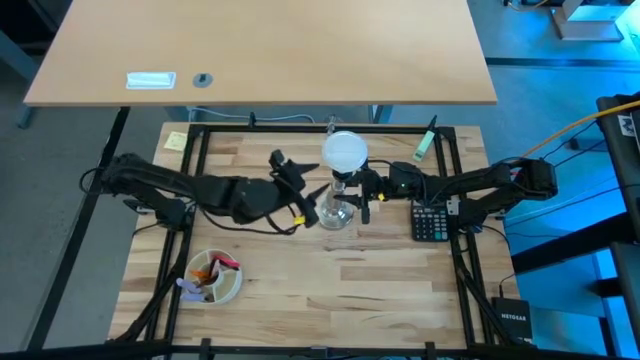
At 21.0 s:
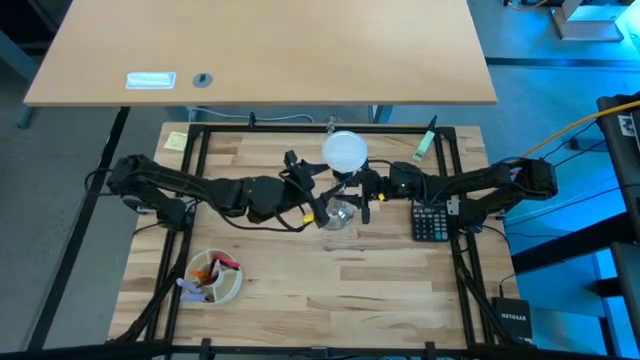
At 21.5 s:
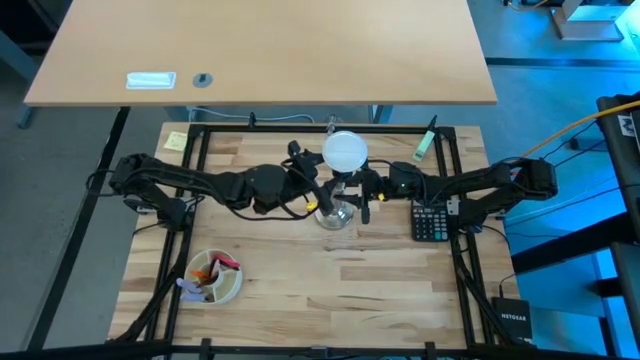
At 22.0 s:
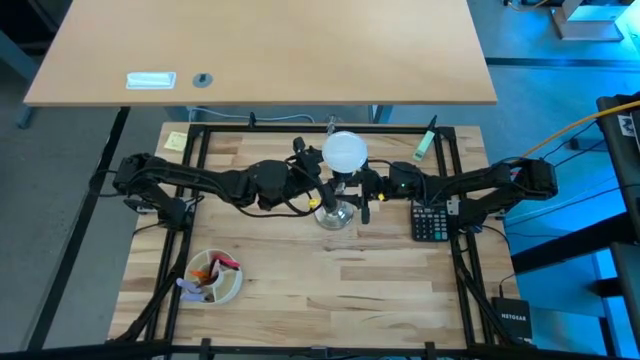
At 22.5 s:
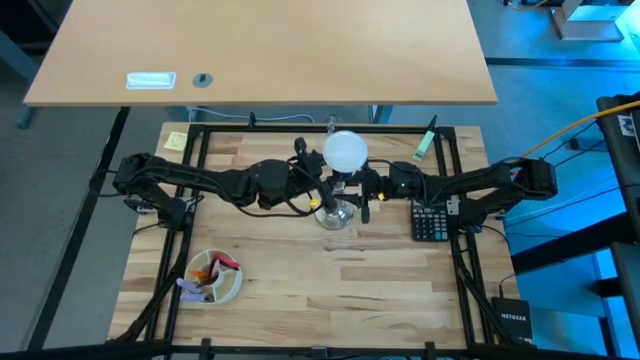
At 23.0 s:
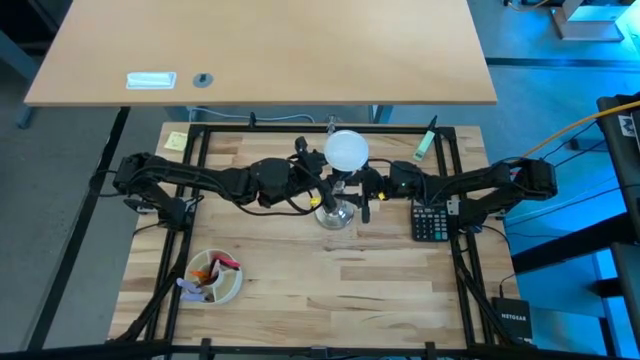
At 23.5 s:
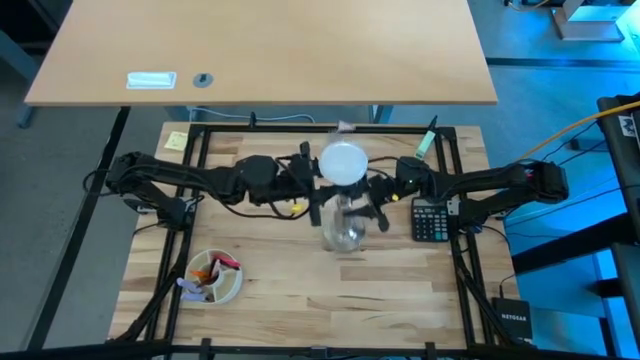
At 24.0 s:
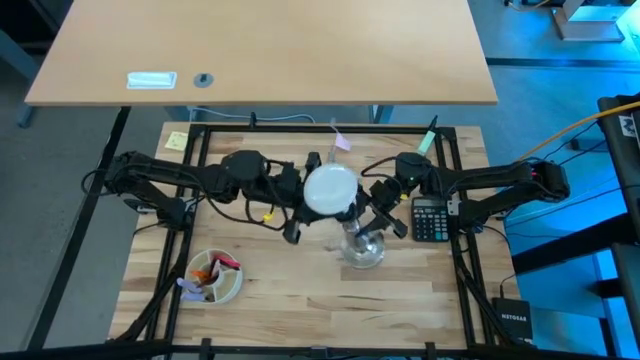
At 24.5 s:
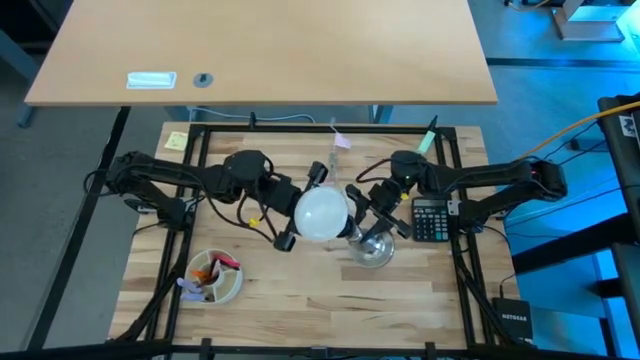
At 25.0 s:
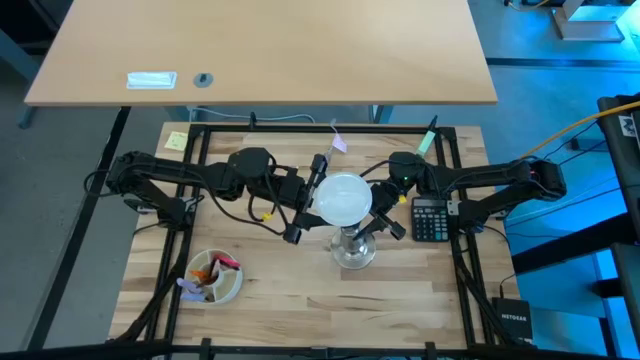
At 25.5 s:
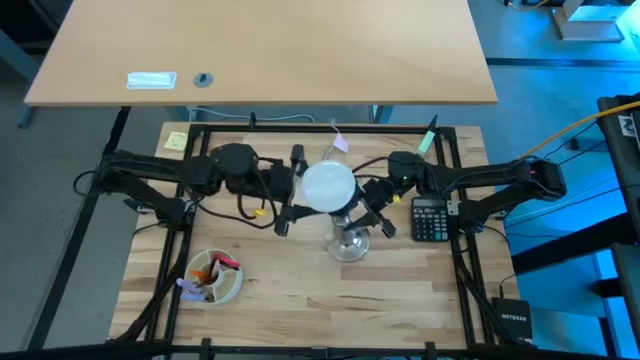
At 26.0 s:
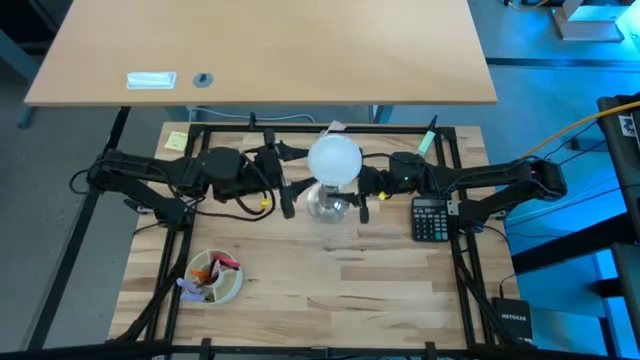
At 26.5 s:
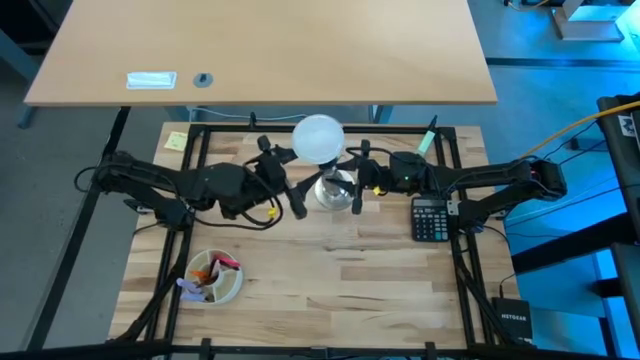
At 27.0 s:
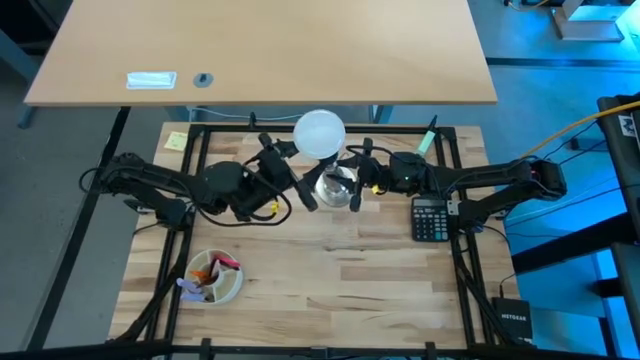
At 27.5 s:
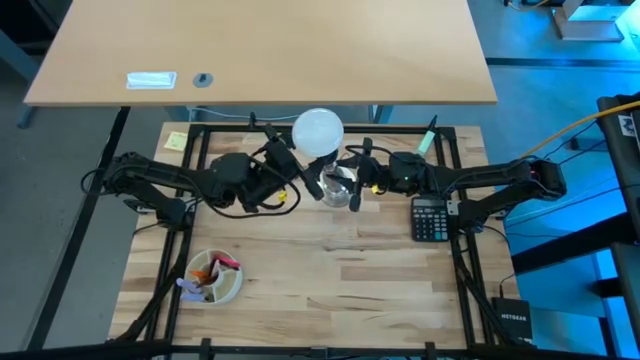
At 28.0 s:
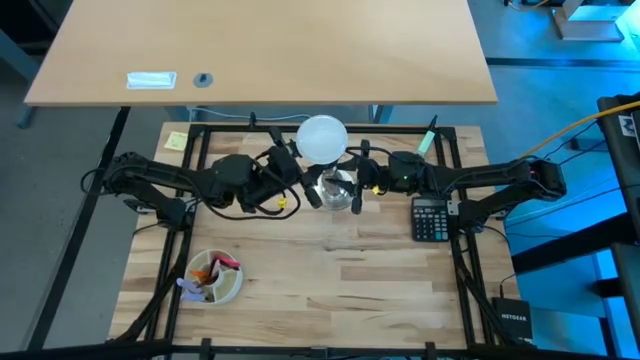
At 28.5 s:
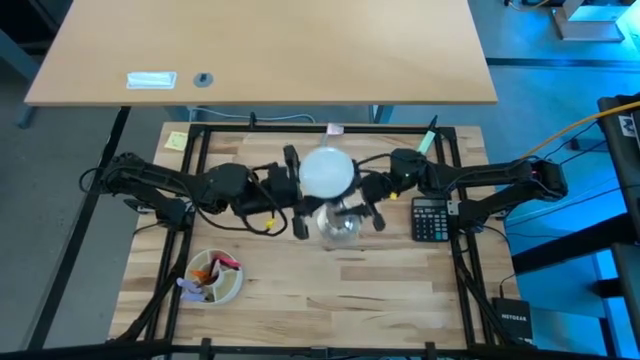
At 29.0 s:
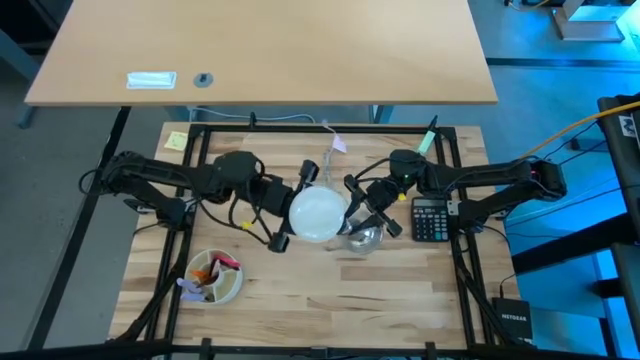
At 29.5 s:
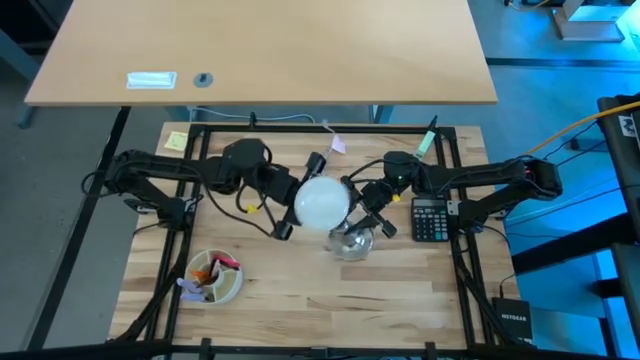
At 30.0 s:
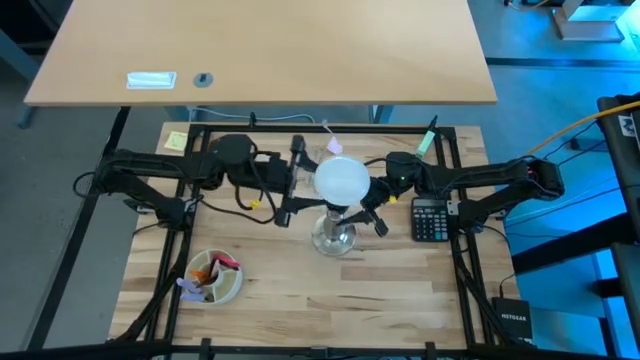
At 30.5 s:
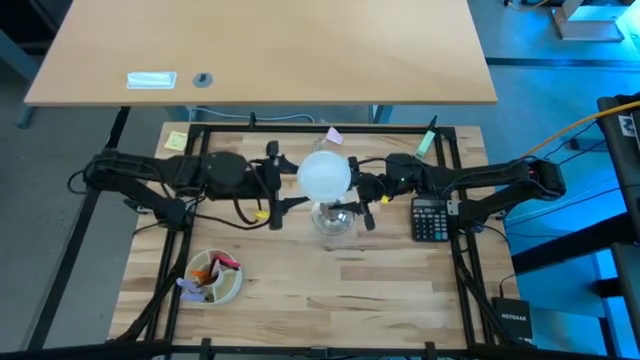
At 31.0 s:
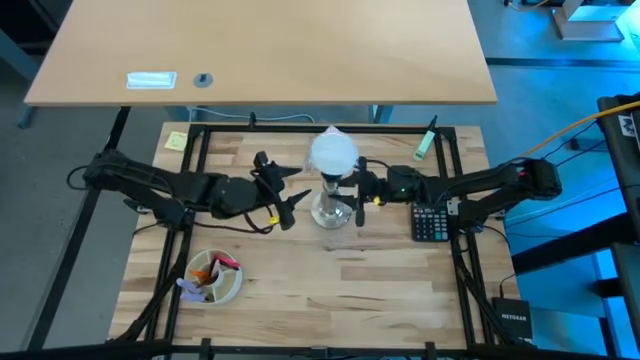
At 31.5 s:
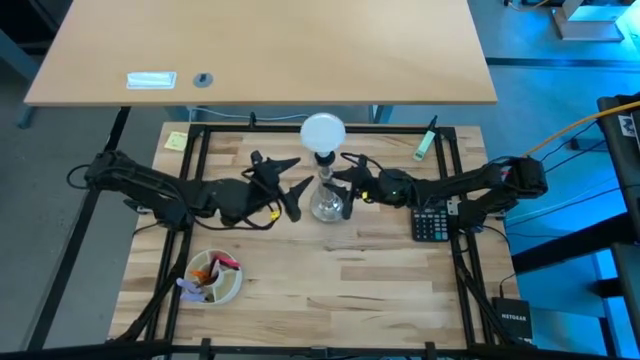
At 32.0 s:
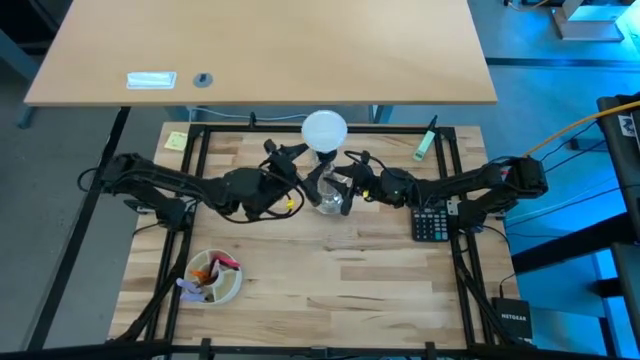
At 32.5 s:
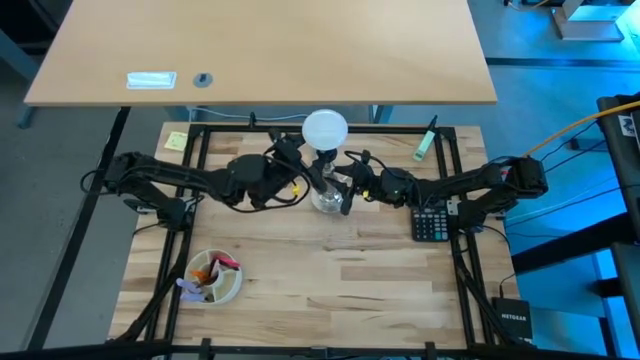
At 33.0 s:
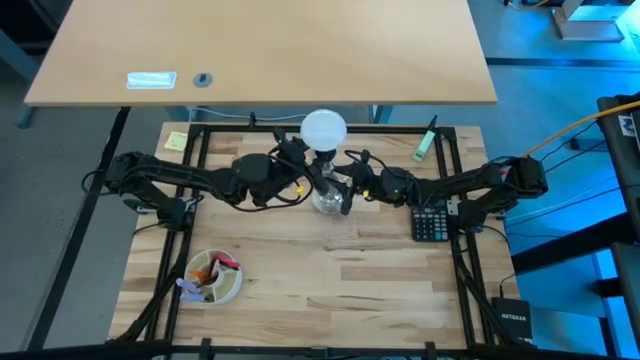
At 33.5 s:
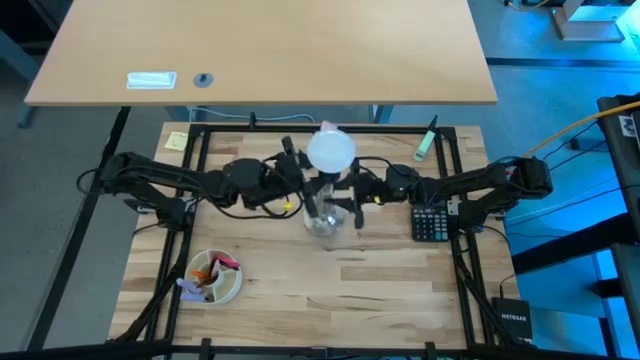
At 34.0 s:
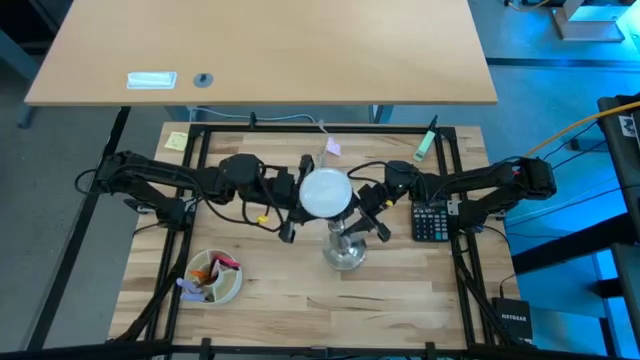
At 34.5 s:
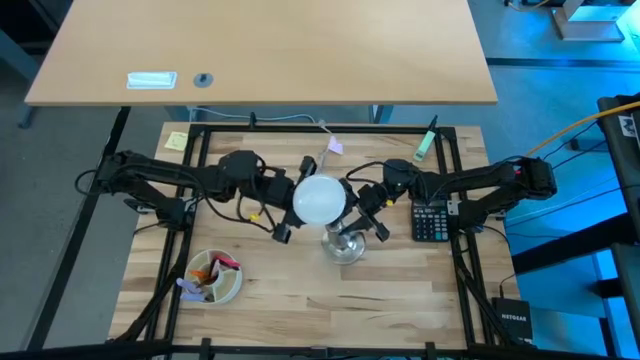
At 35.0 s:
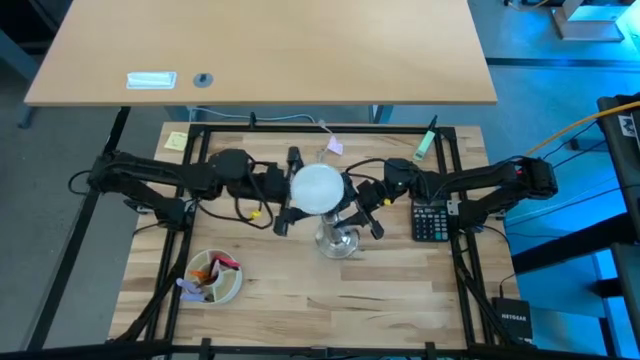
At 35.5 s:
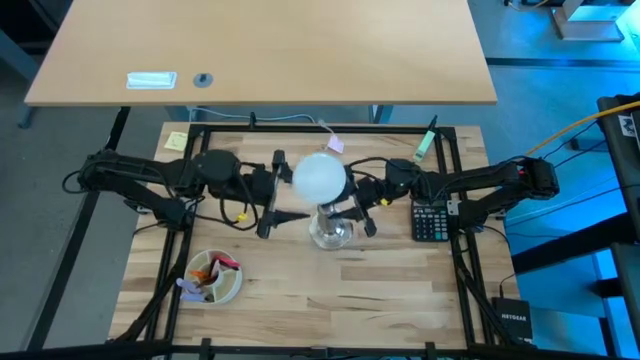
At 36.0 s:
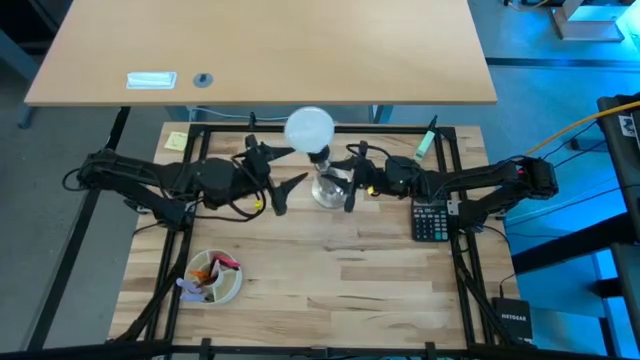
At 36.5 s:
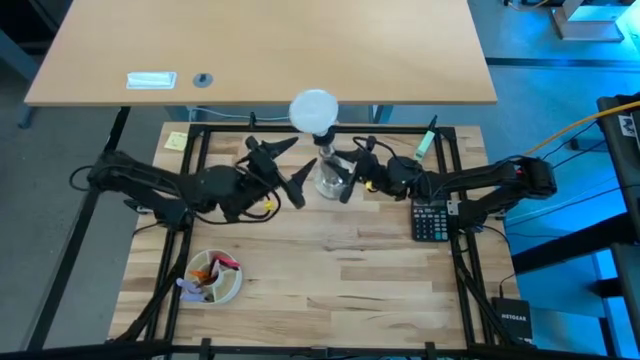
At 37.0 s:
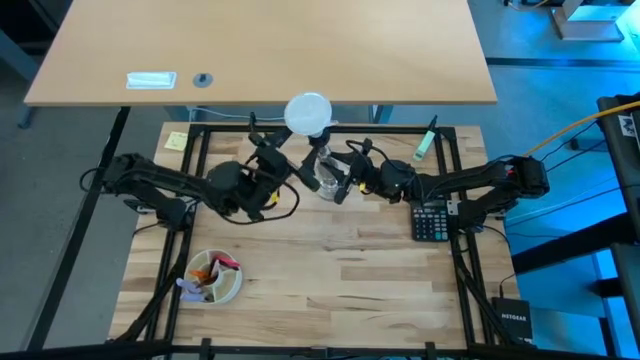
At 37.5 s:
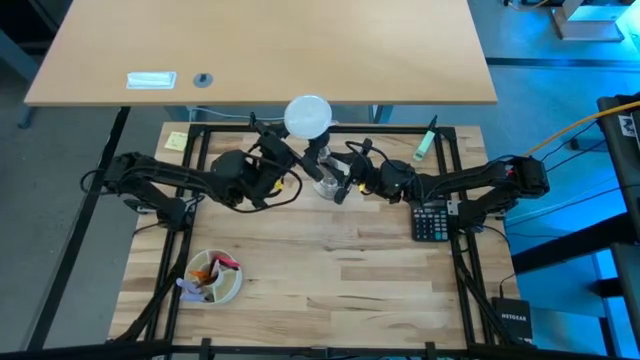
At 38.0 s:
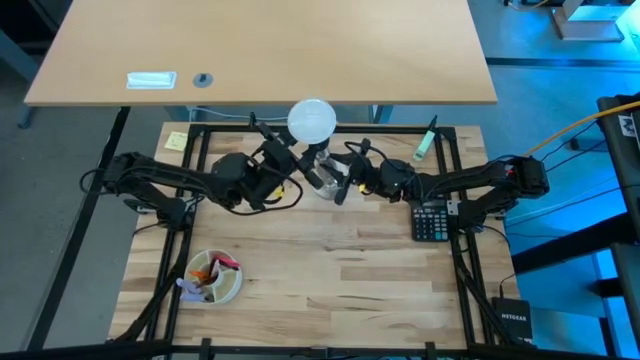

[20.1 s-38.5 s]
Task: Screw lightbulb
Insert the lightbulb into the silver lamp

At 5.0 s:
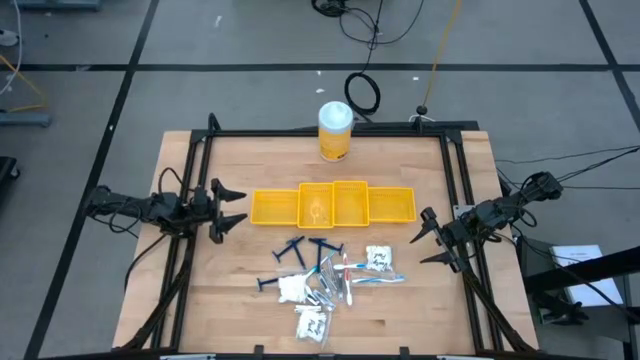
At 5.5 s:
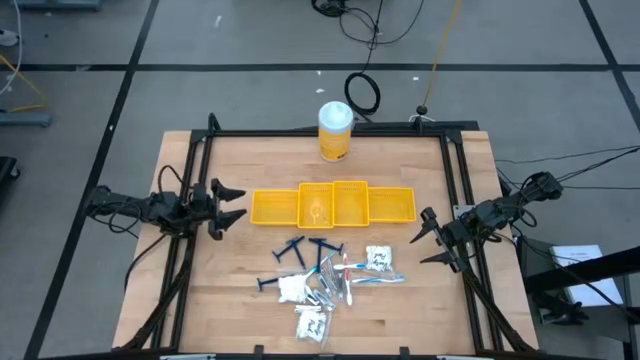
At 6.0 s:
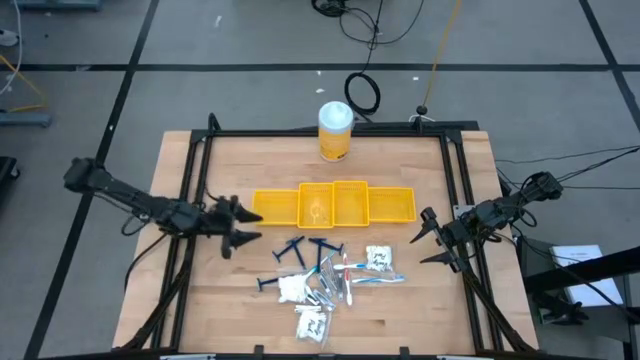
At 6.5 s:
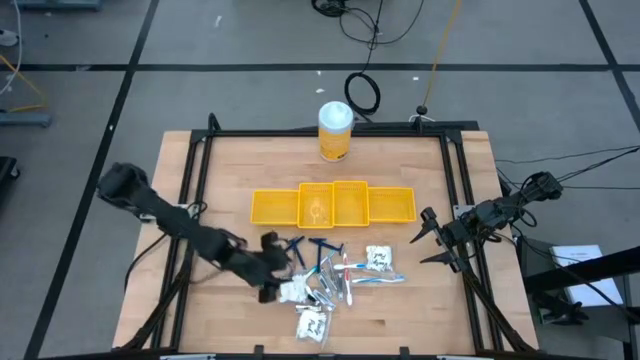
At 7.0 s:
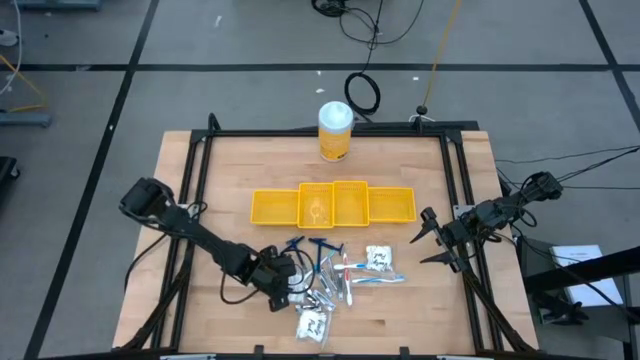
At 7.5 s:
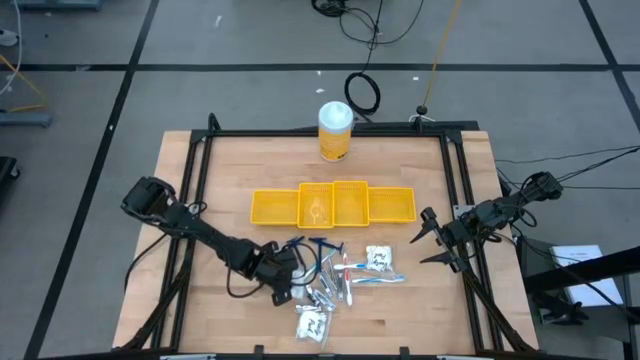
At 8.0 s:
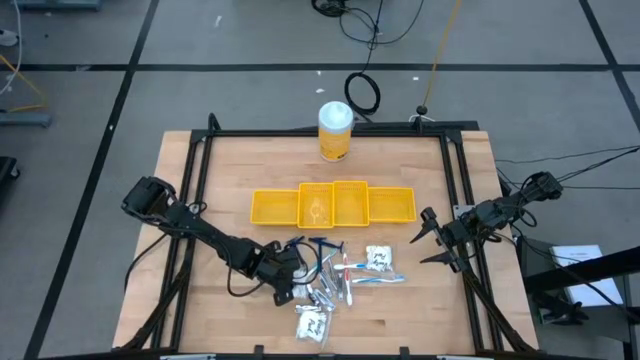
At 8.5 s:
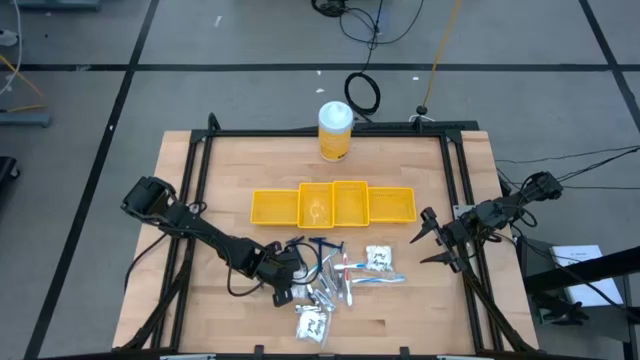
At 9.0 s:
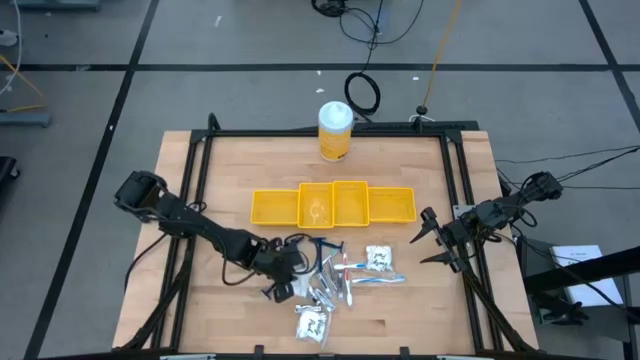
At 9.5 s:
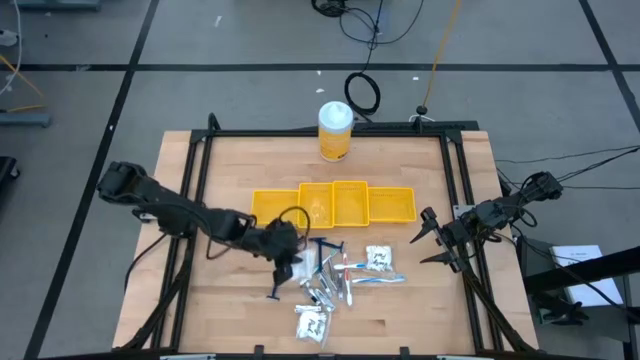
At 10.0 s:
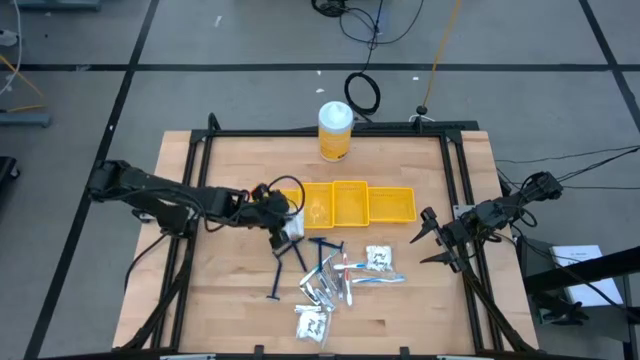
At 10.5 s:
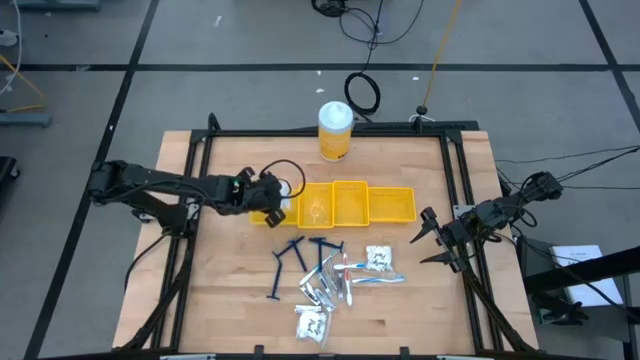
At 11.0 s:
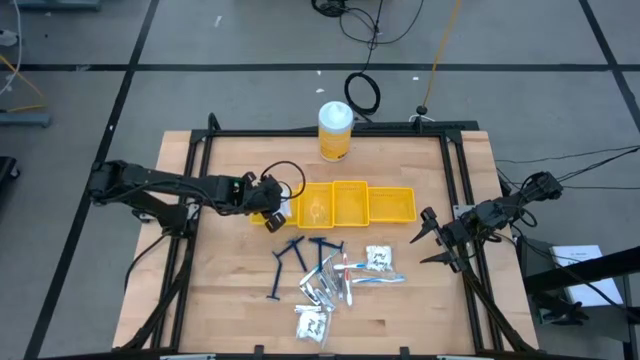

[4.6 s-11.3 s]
Task: Pick & Place Travel size toiletries
Put the middle vanity pack into the left yellow bin
